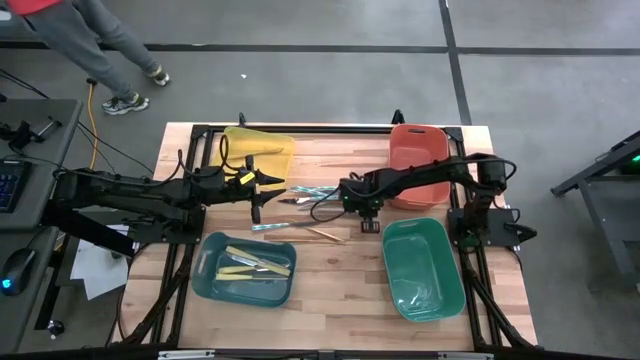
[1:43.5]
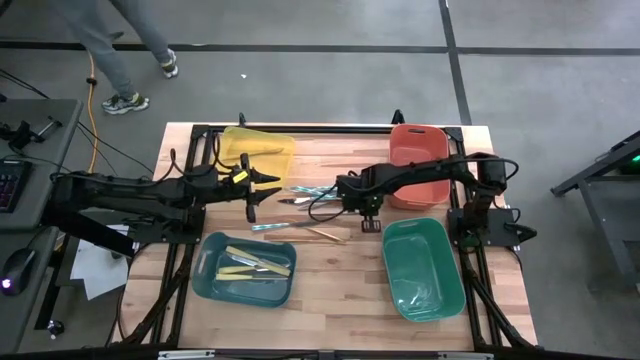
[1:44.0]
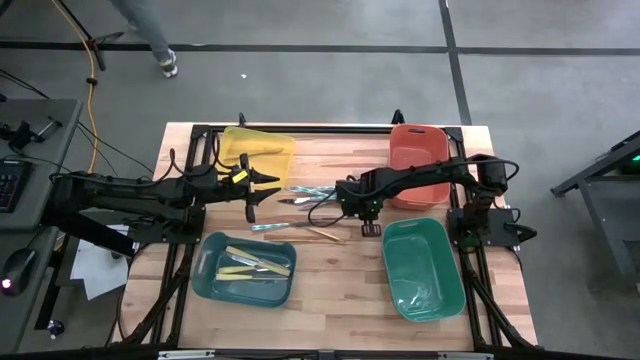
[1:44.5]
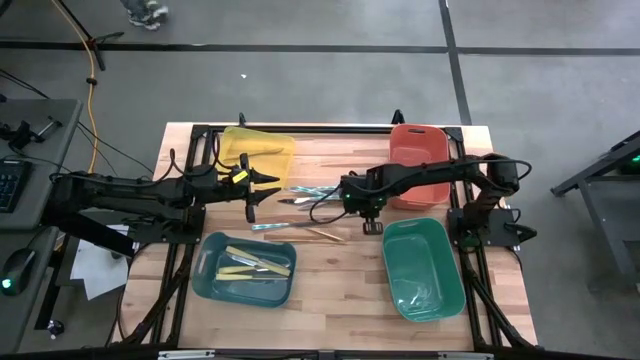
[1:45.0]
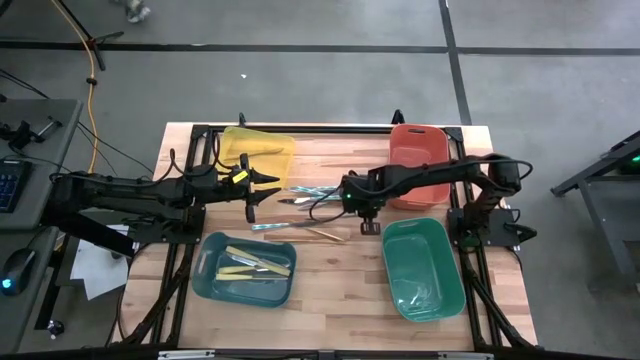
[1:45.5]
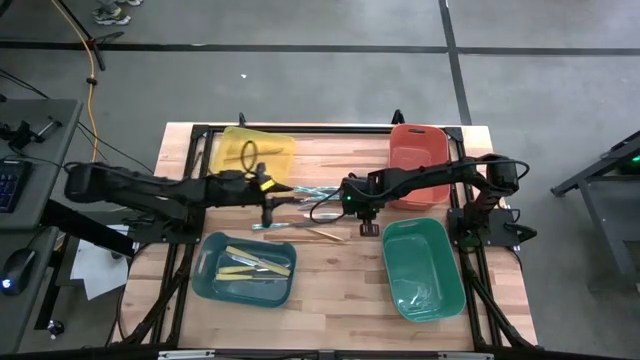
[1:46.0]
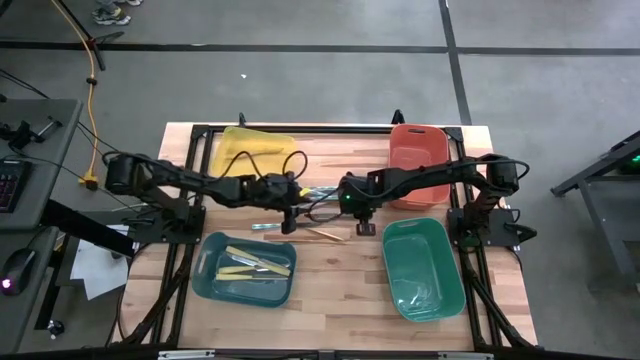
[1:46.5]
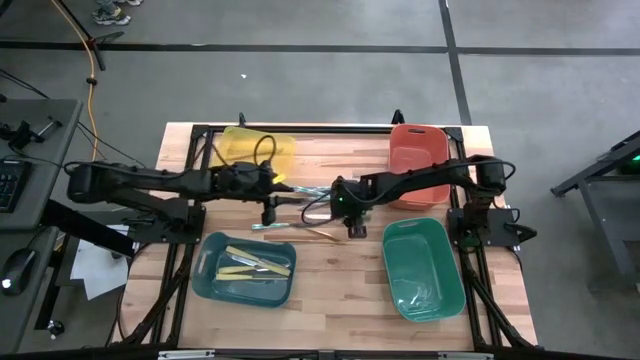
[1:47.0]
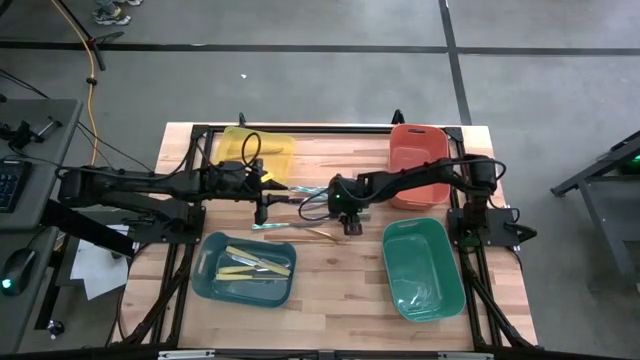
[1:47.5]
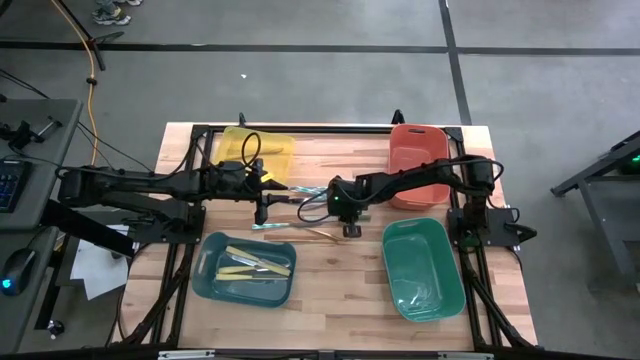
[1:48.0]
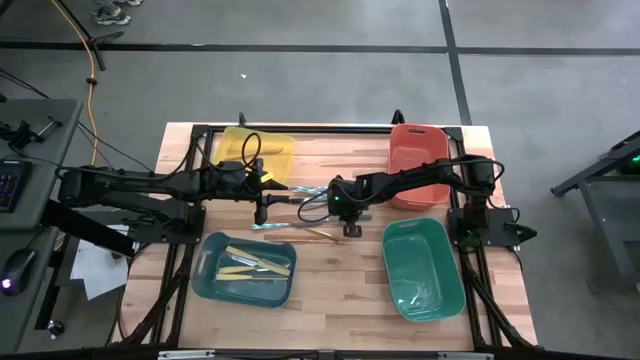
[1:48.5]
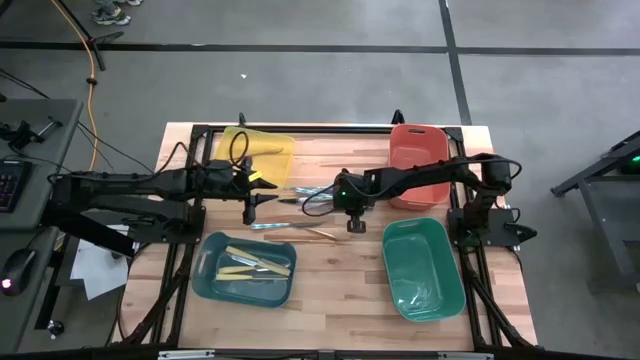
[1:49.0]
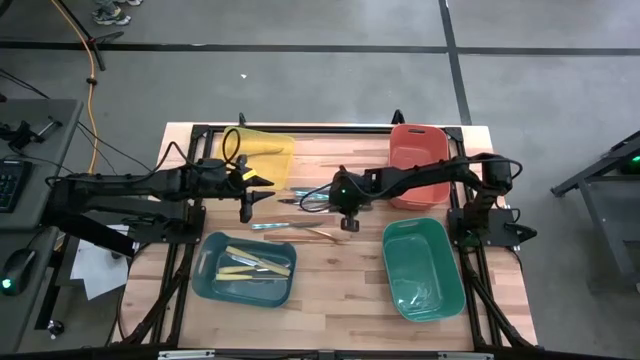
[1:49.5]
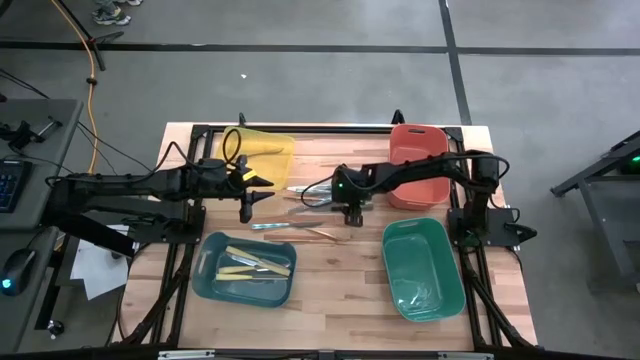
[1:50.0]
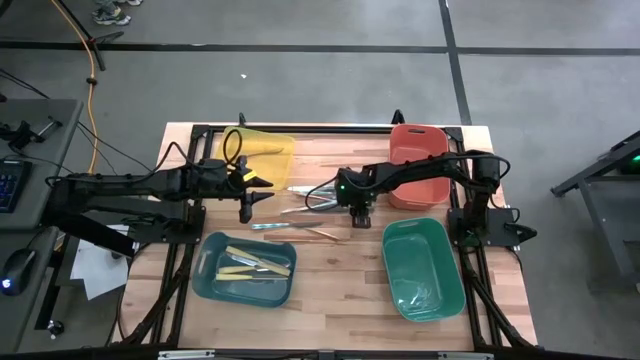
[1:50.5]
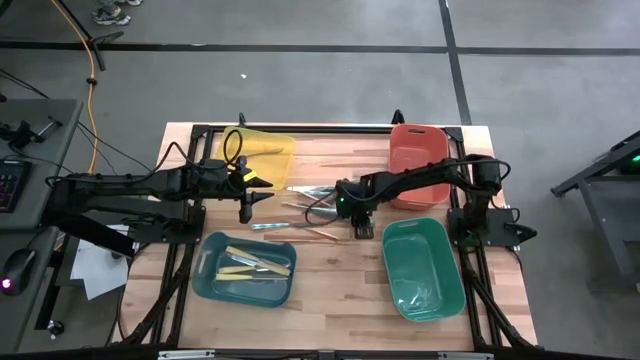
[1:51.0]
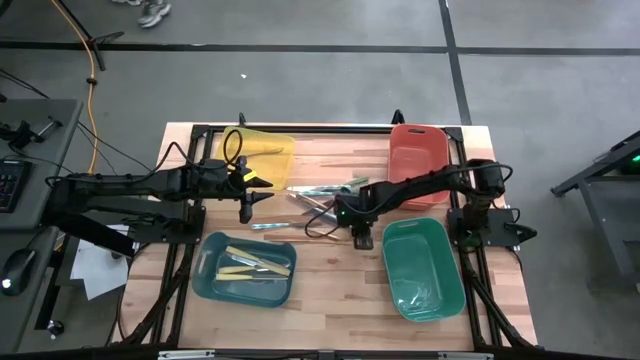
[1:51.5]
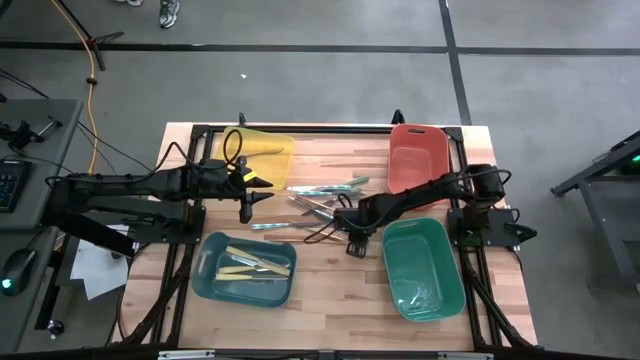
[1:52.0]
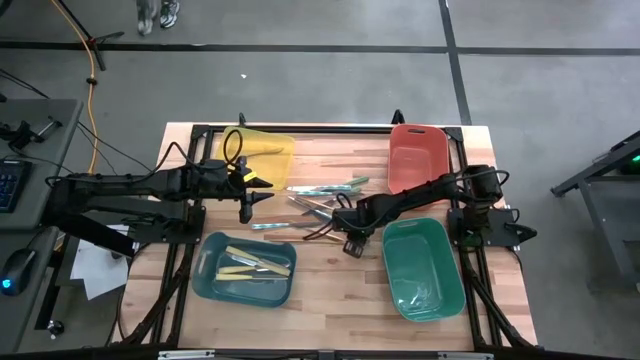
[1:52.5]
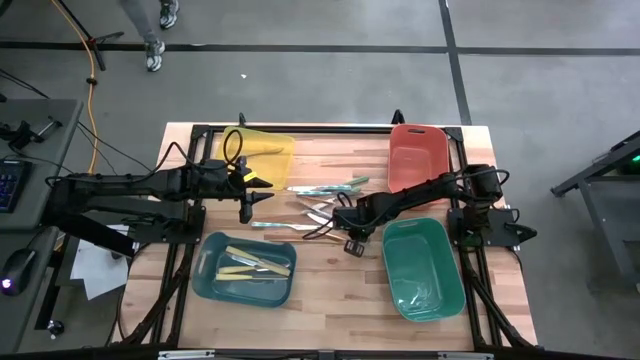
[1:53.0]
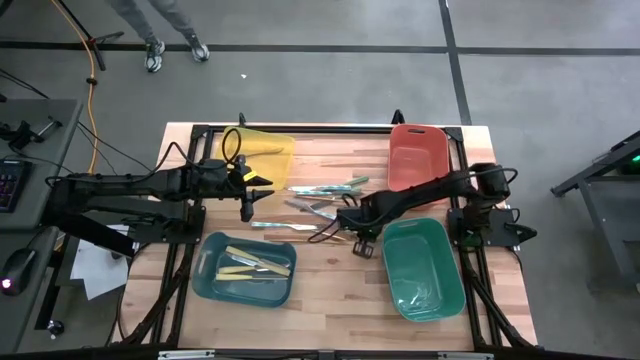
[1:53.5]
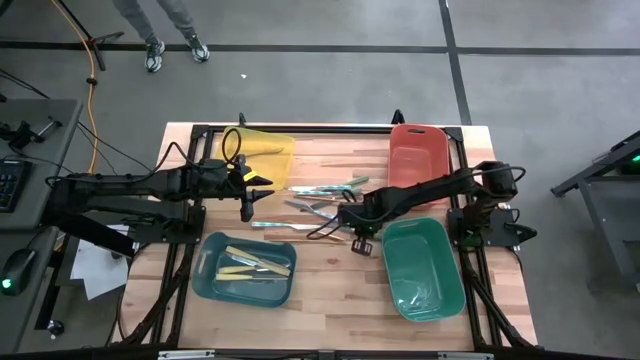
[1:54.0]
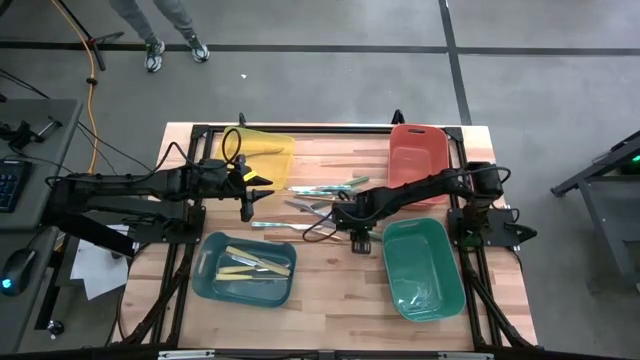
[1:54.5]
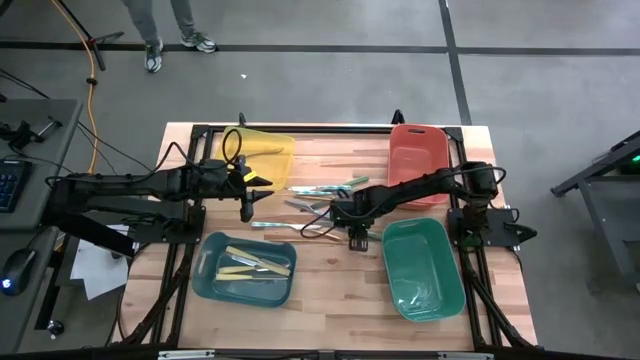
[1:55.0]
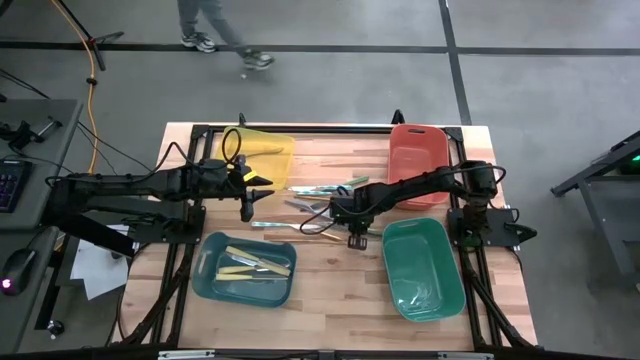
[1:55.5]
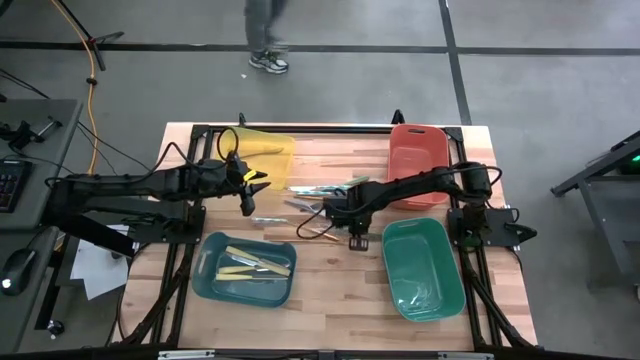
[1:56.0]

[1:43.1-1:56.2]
Task: Sort silverware by color (type)
Put the green knife into the orange bin

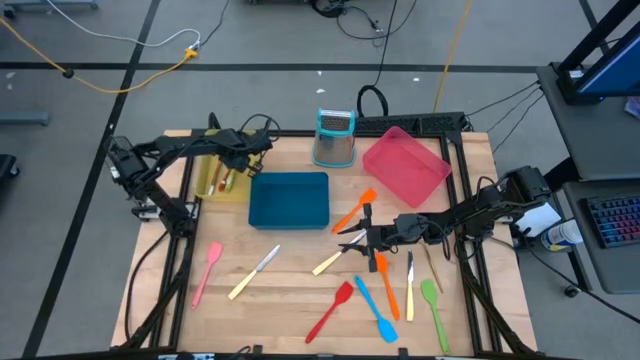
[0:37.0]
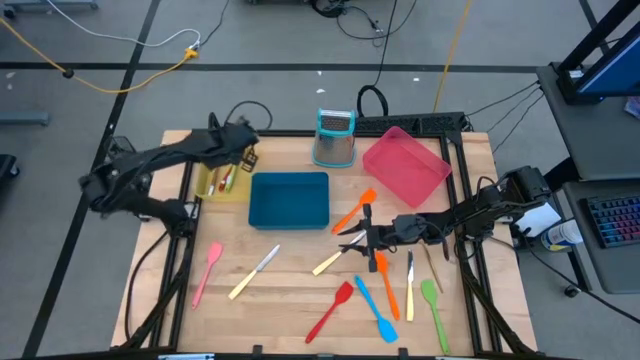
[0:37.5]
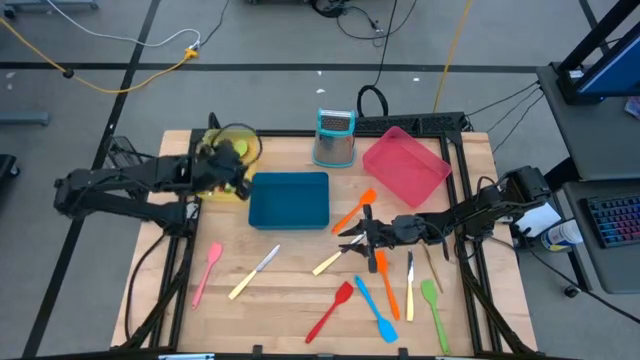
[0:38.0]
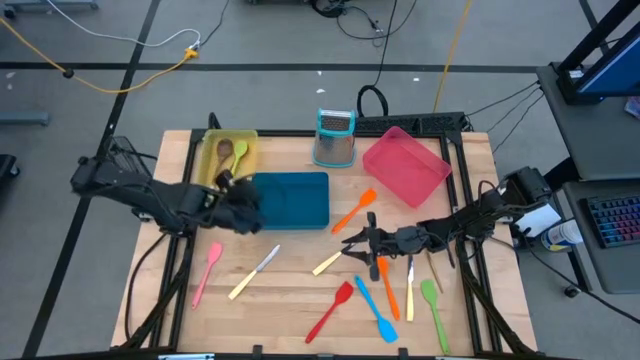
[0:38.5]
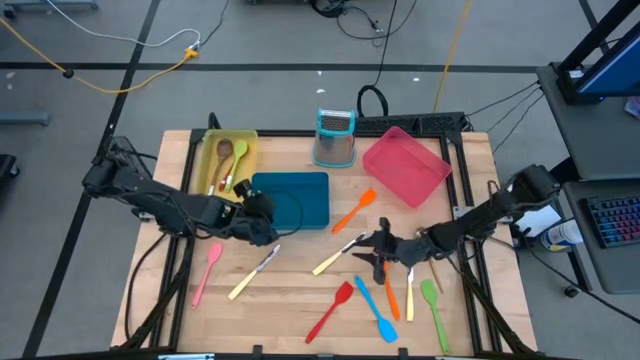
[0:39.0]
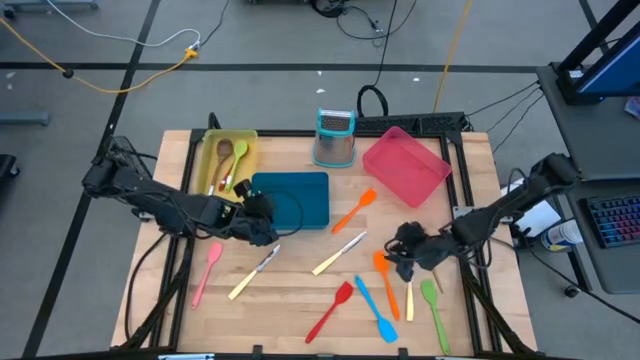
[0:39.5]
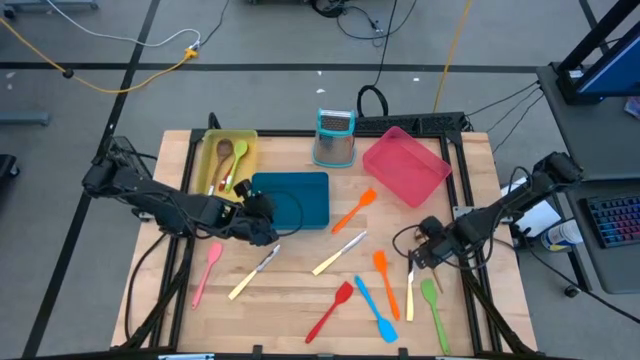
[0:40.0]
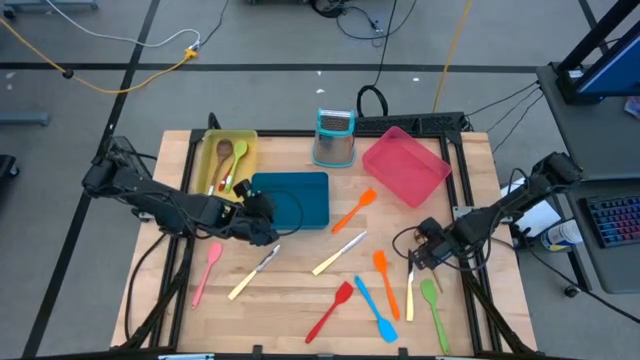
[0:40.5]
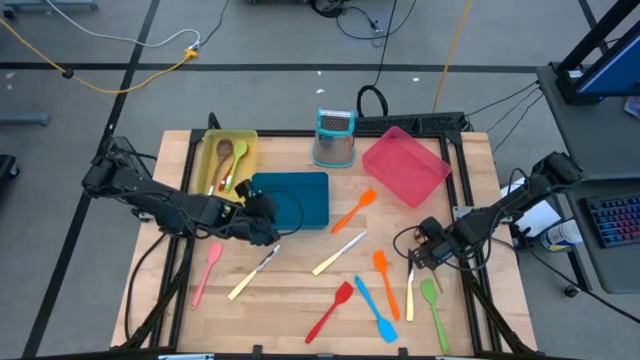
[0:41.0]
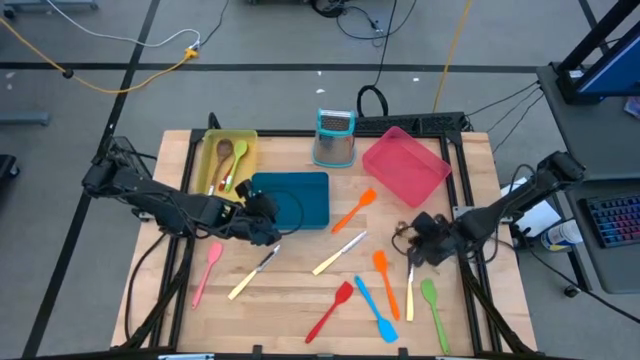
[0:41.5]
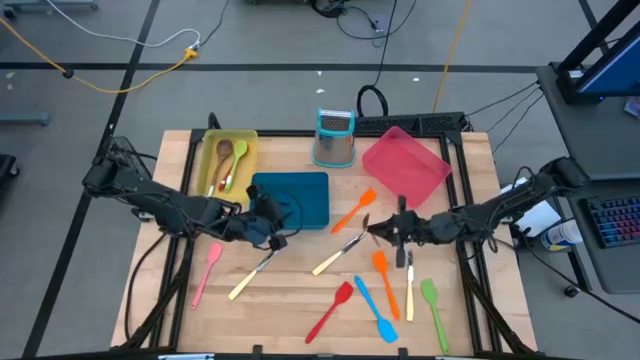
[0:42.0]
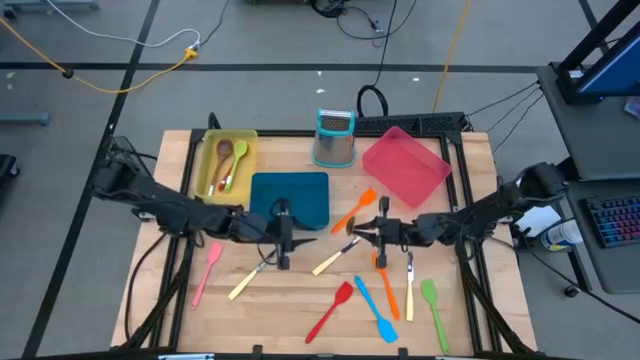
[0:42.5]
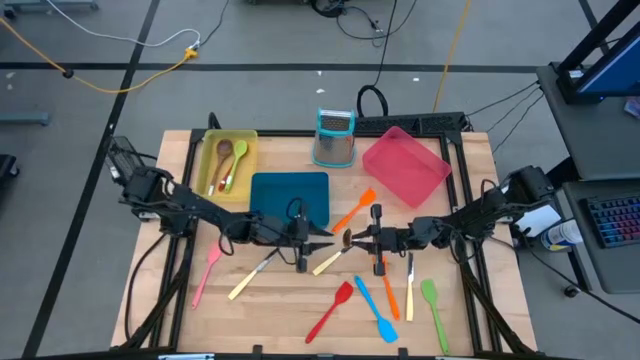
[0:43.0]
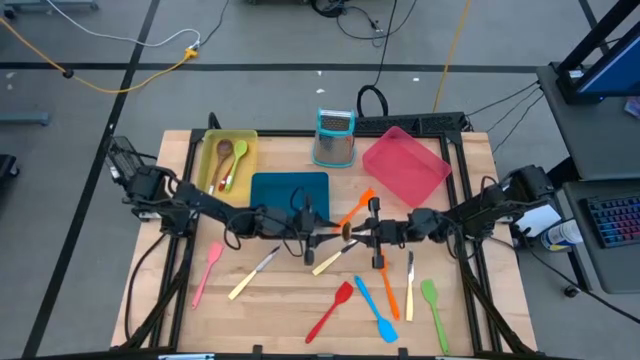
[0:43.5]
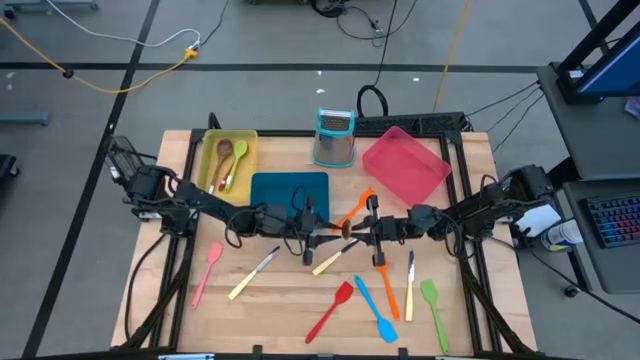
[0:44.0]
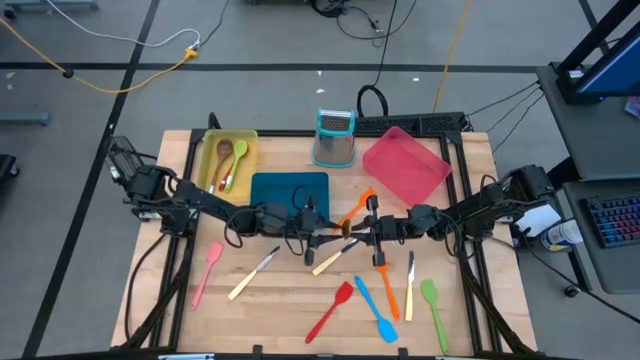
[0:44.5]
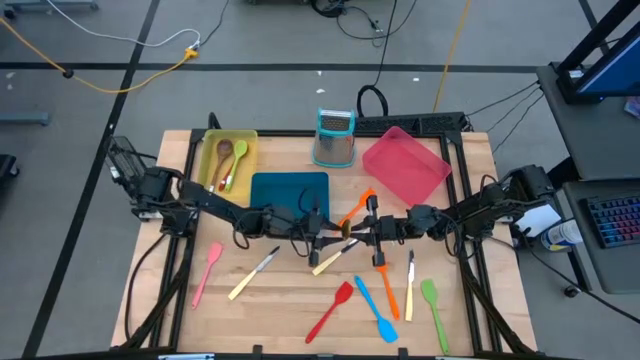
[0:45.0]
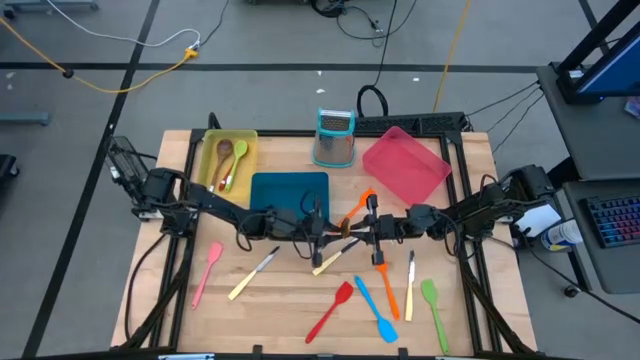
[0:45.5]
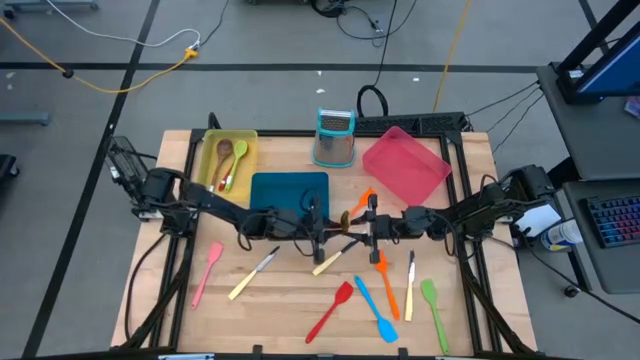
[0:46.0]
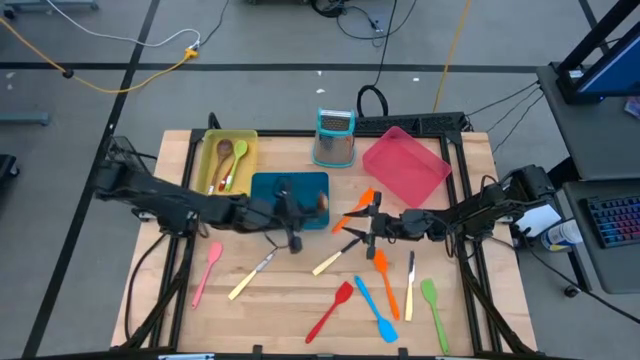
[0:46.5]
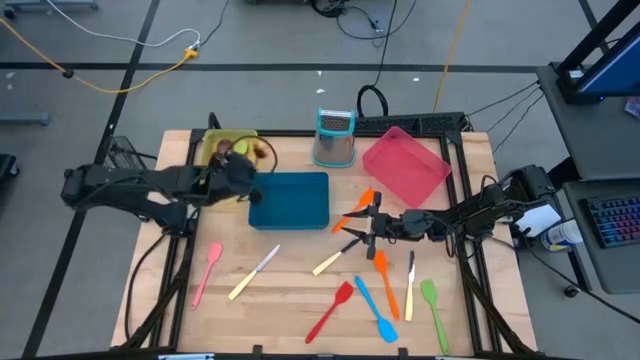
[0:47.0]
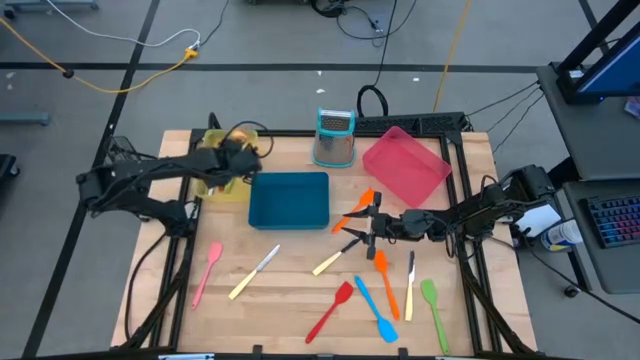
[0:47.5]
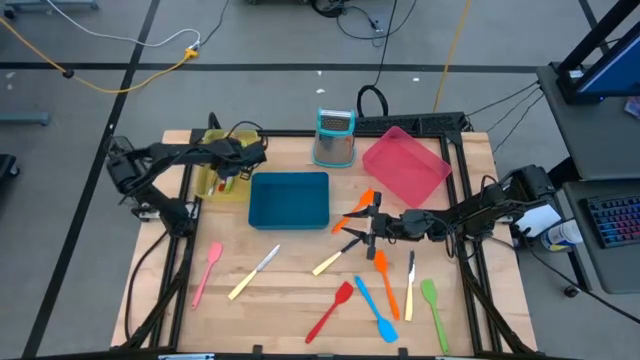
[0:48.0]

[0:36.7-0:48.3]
Task: Pick & Place Kitchen Items
Put the golden serving spoon into the yellow bin
